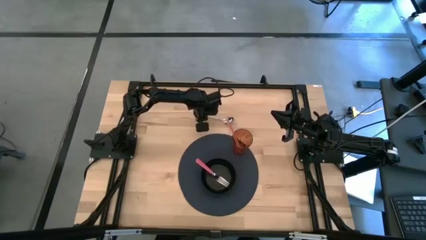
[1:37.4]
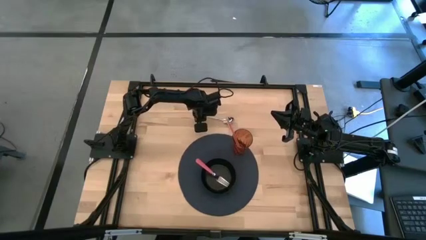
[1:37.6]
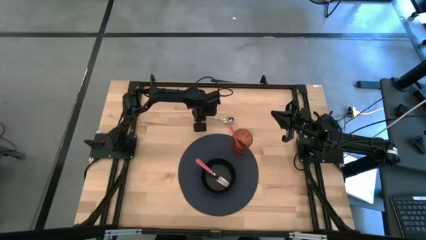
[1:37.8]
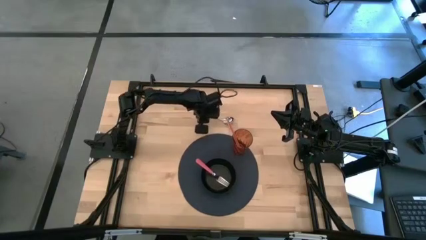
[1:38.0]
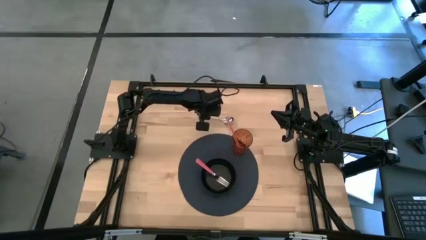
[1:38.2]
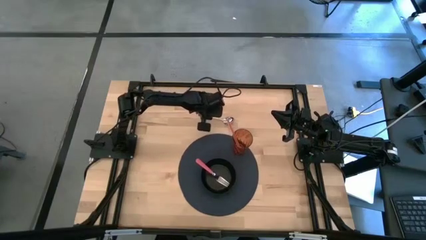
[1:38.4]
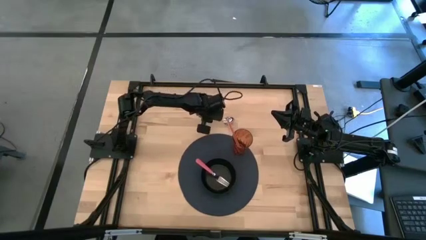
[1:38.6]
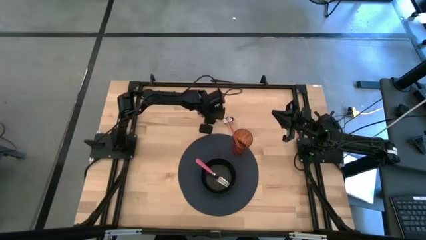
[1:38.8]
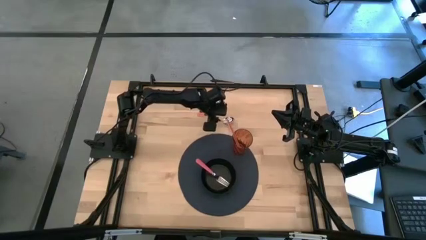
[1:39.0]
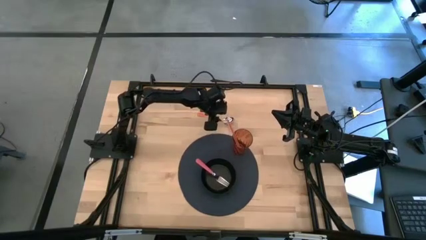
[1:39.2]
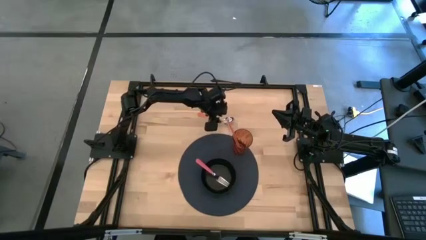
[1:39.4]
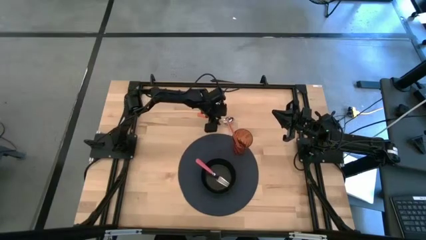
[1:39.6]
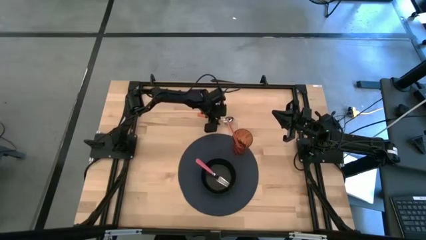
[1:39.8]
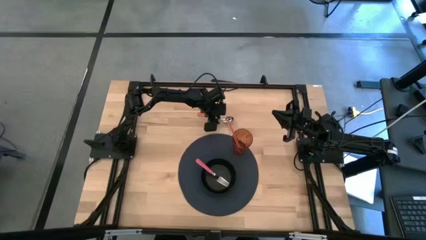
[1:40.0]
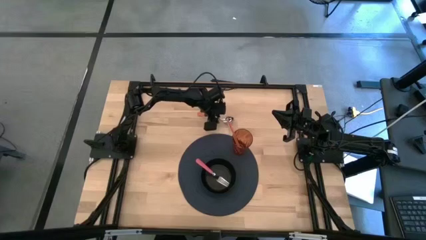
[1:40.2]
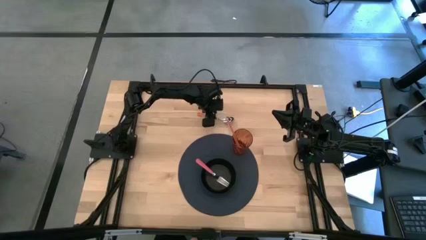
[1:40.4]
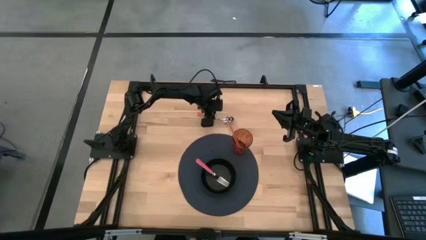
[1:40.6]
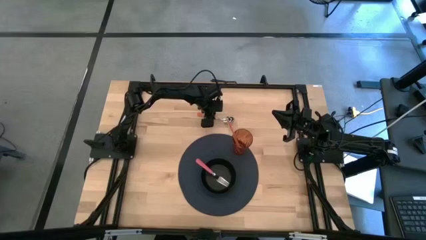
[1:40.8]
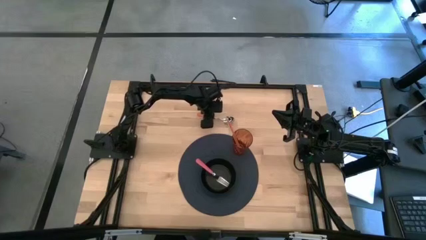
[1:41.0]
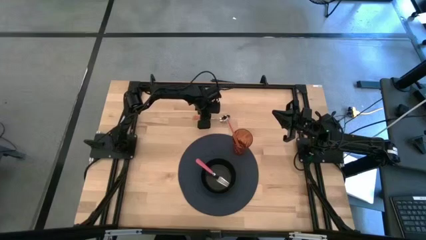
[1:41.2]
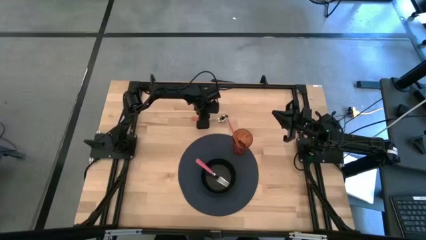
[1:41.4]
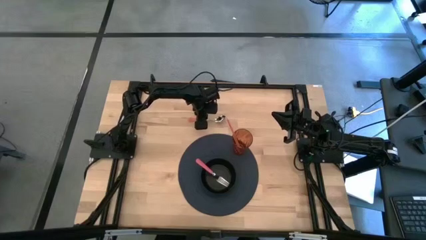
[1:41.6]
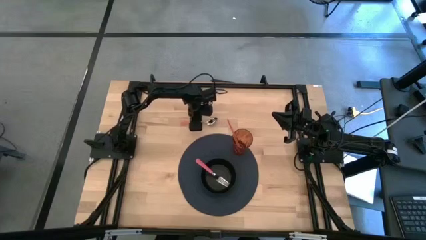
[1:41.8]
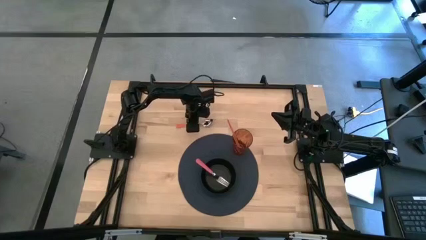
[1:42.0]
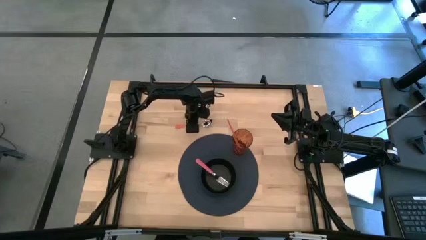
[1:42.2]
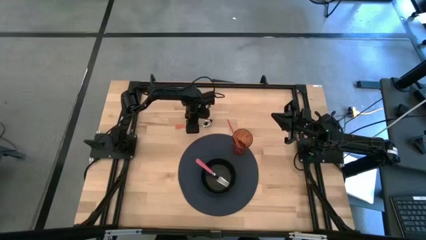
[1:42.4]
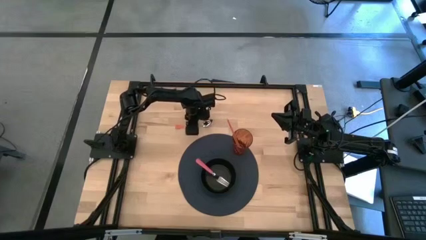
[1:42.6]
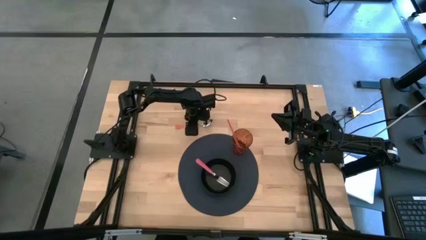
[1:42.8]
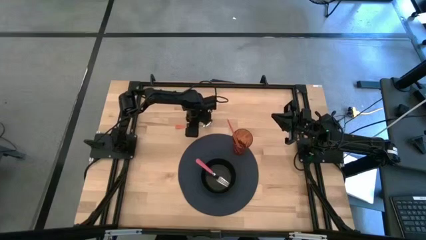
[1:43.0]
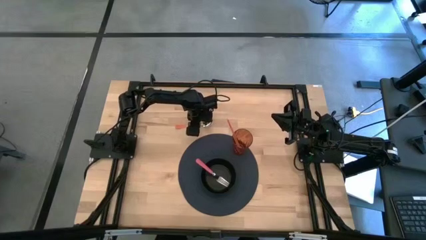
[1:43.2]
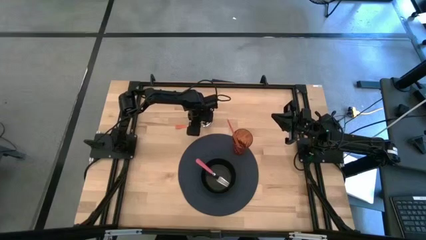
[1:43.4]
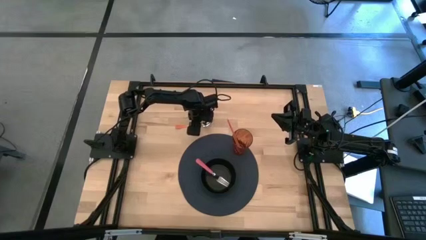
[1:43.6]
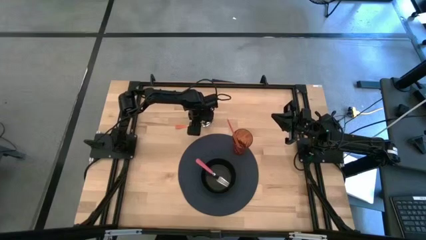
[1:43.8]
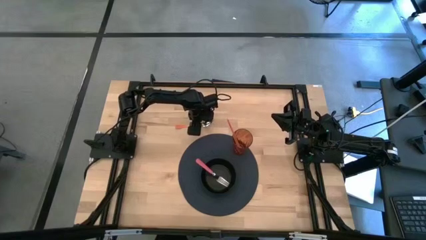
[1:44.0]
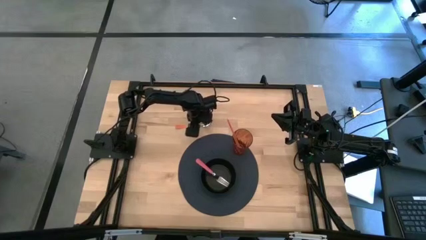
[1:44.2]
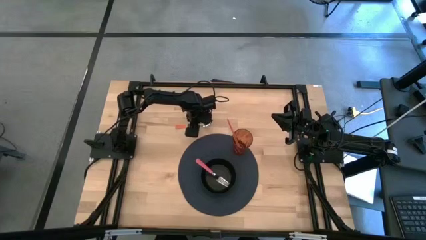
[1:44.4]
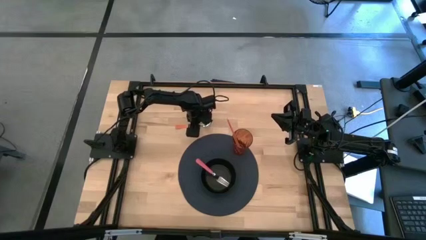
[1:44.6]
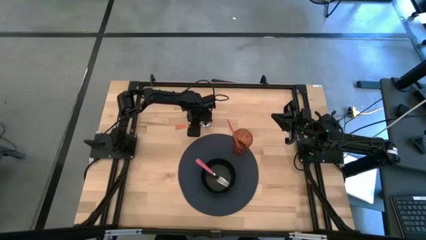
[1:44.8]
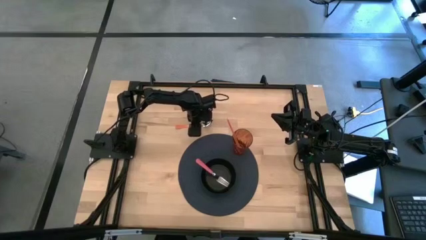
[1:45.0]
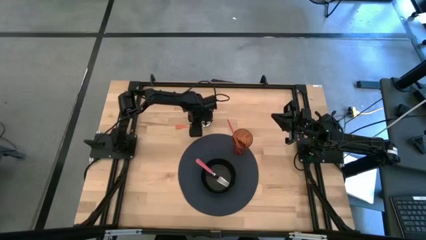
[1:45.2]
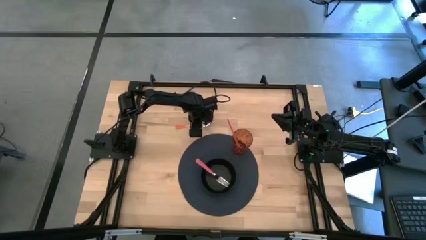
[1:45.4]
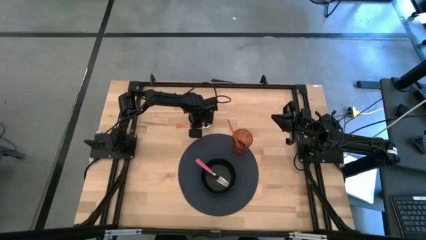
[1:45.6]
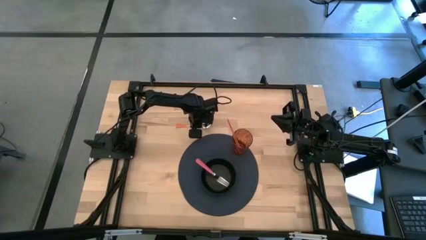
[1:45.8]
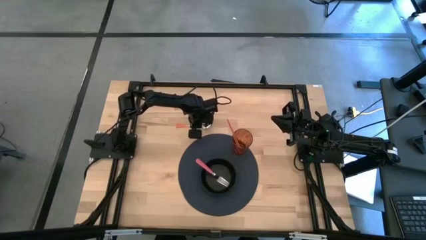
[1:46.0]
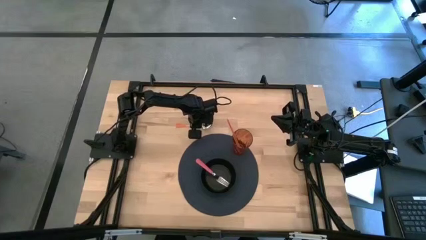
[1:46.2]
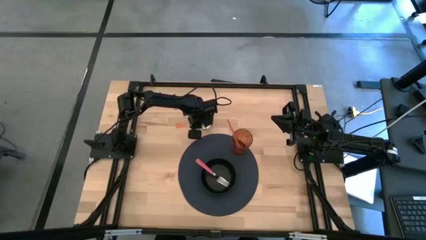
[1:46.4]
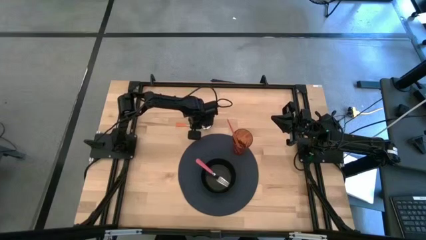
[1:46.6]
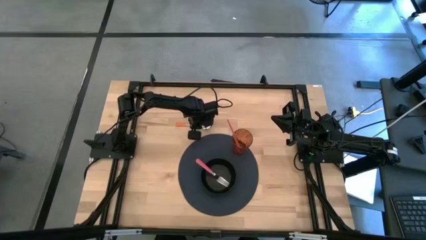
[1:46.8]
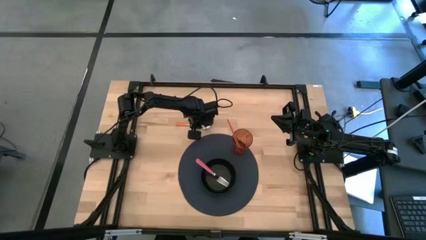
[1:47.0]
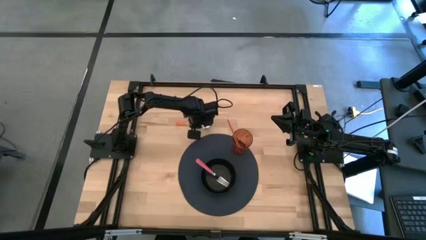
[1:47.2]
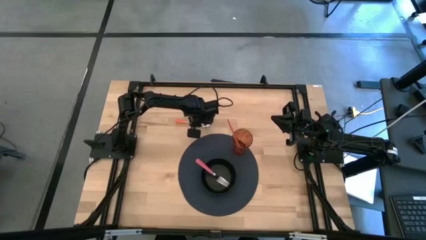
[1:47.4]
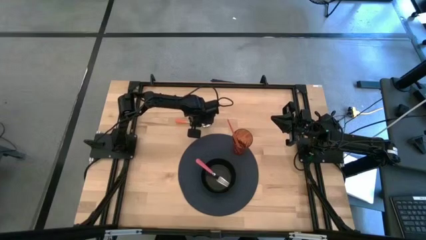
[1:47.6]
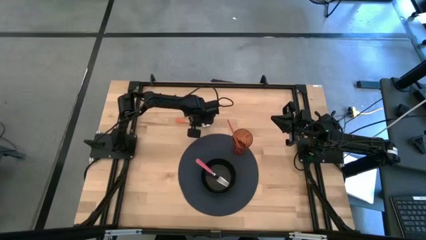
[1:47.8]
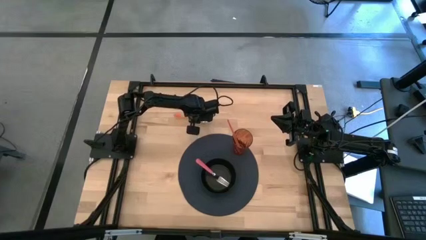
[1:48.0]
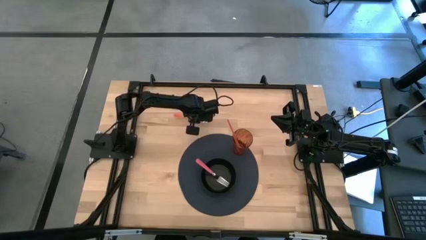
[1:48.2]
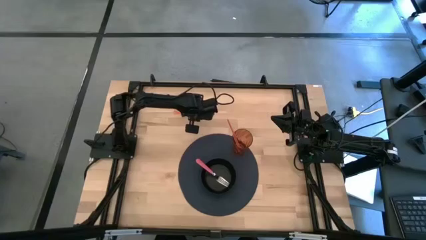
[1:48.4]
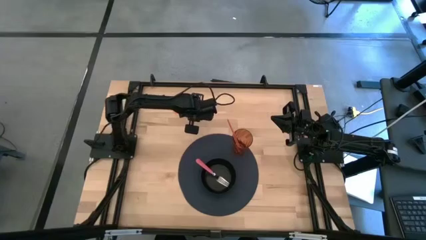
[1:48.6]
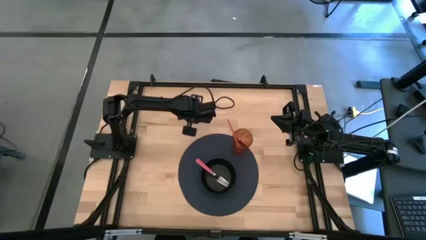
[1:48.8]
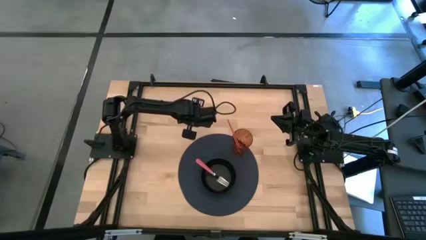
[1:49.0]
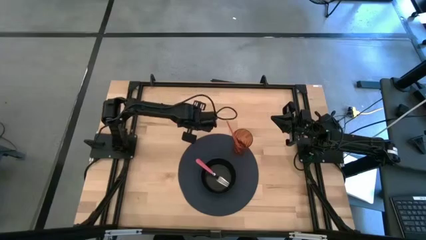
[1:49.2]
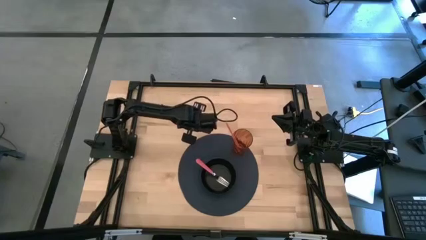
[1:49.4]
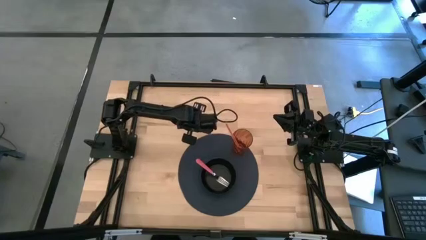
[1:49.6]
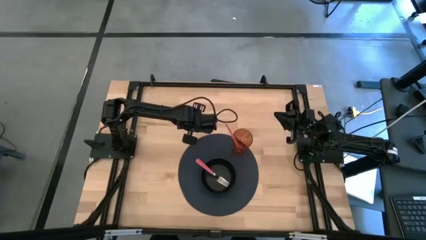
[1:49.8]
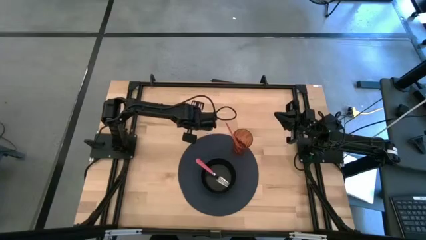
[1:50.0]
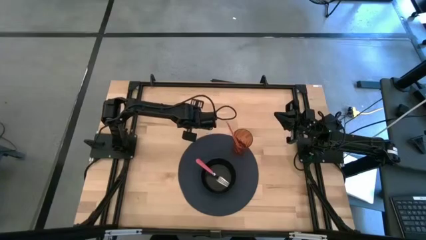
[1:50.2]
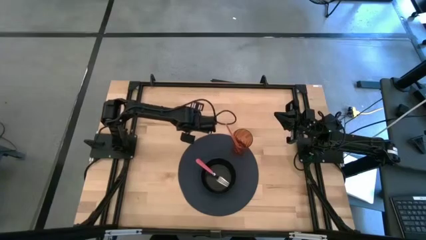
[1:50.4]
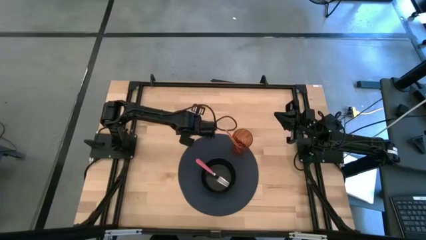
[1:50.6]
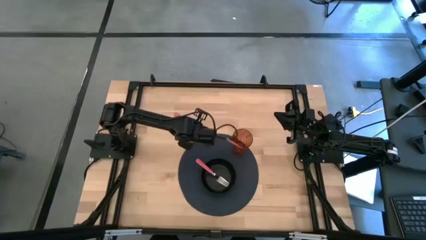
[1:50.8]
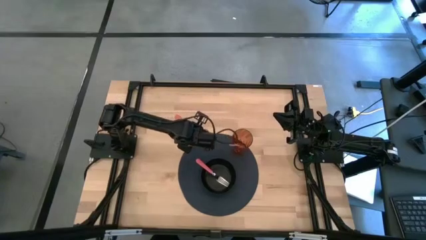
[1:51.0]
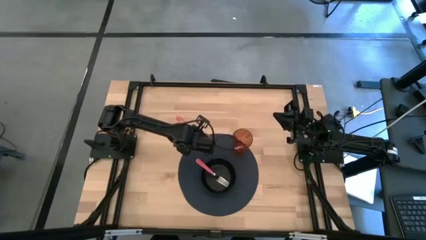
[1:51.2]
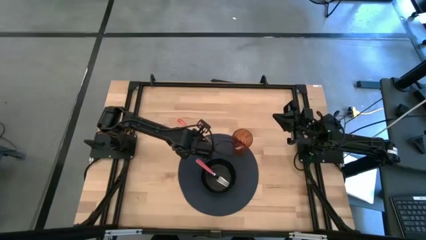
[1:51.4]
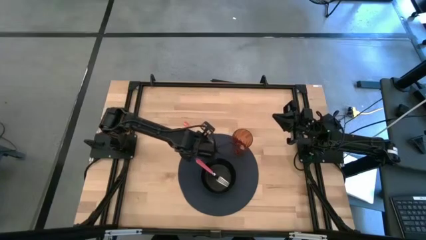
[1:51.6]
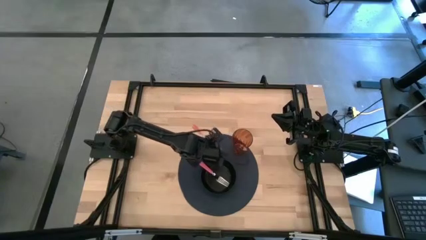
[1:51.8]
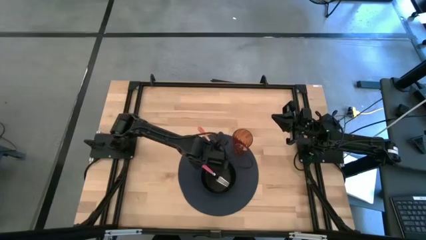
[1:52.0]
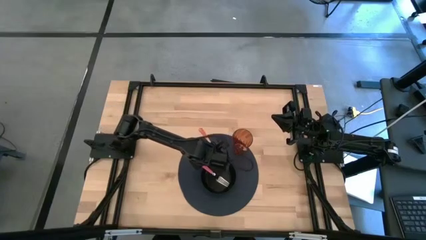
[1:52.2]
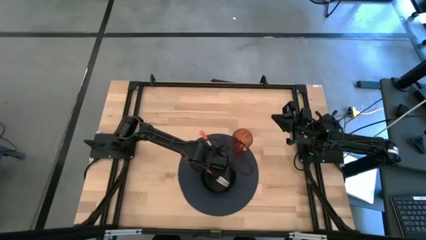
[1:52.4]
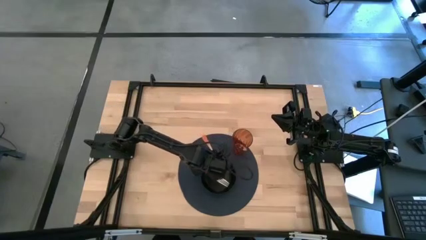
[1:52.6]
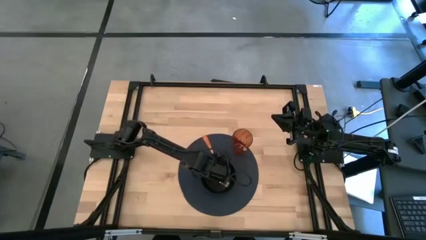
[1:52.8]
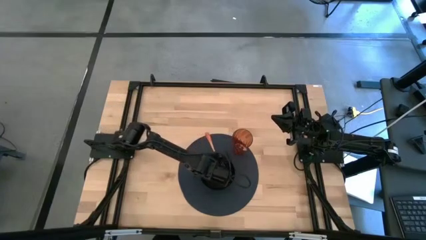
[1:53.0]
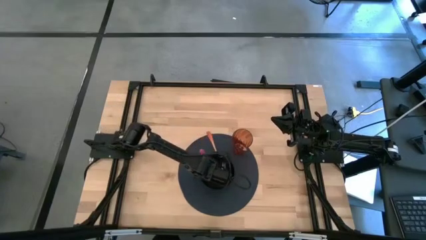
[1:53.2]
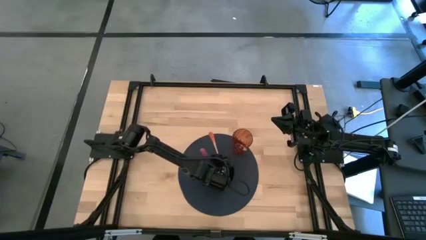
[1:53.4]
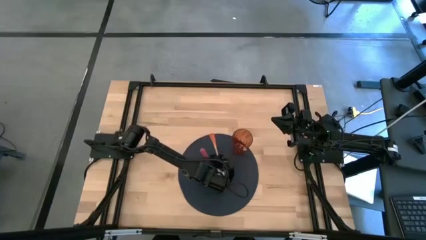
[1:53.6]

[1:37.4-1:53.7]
Task: Pick & Place Utensil
Put the orange spoon into the black bowl on the blue mat
